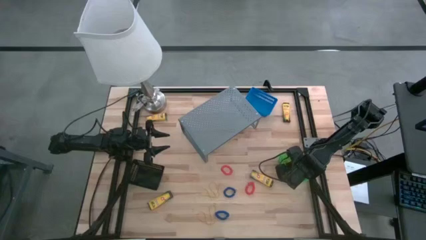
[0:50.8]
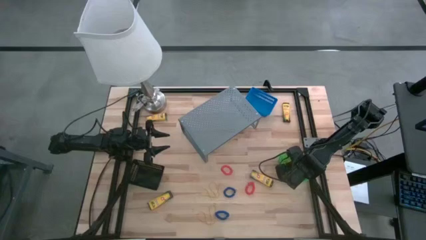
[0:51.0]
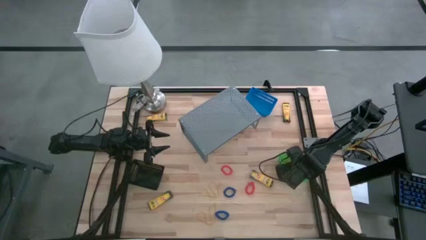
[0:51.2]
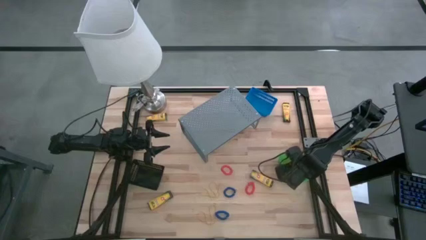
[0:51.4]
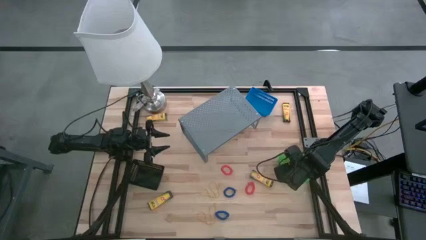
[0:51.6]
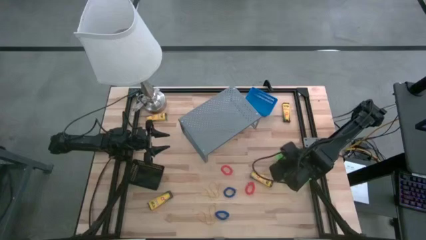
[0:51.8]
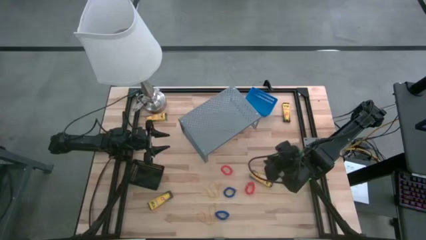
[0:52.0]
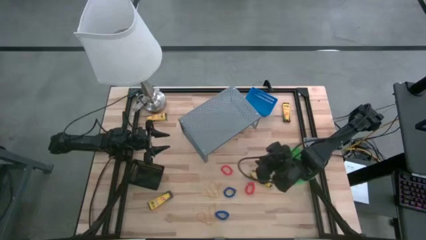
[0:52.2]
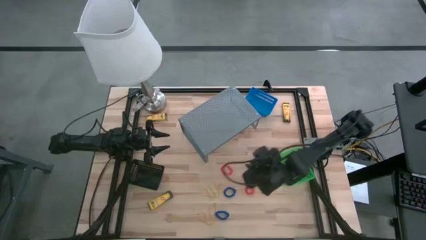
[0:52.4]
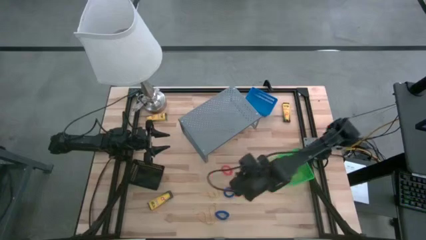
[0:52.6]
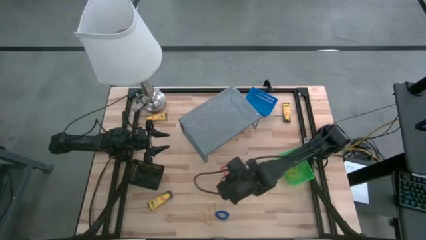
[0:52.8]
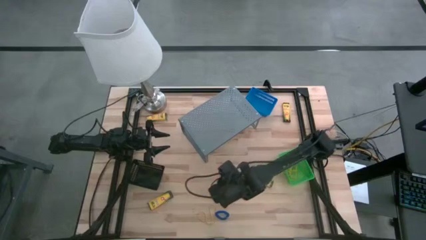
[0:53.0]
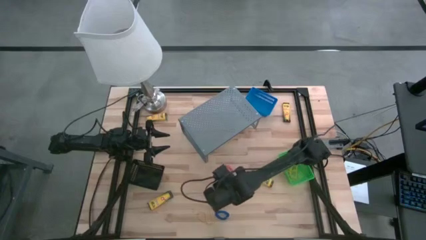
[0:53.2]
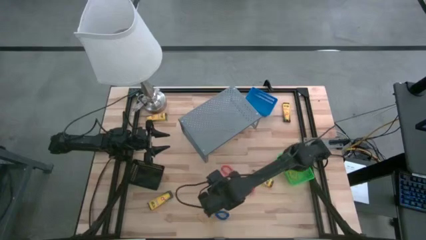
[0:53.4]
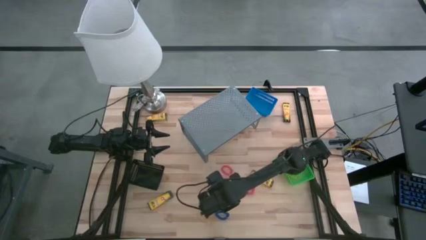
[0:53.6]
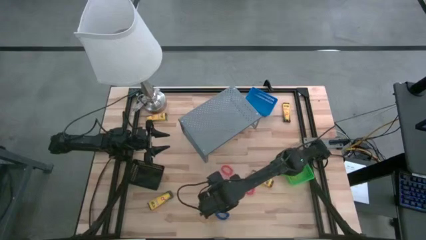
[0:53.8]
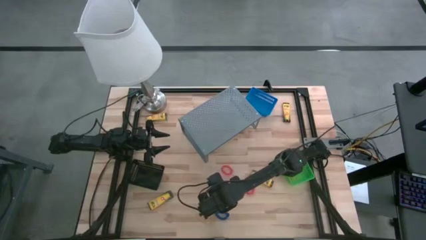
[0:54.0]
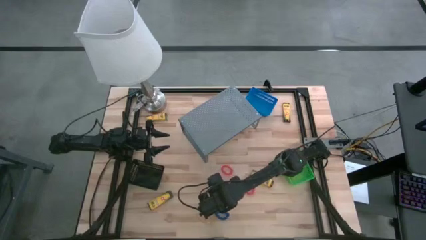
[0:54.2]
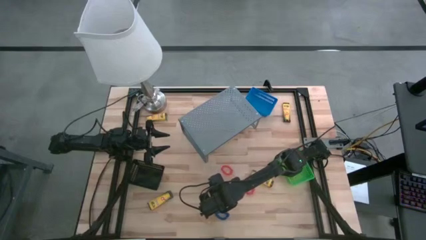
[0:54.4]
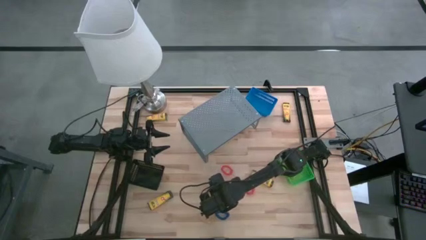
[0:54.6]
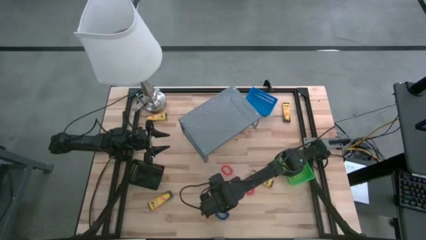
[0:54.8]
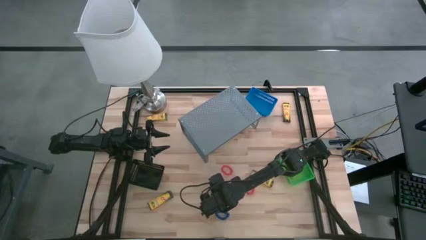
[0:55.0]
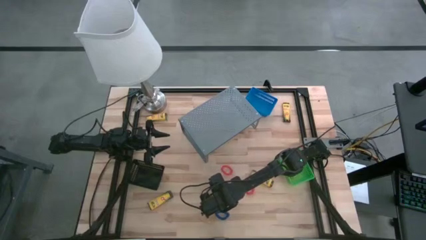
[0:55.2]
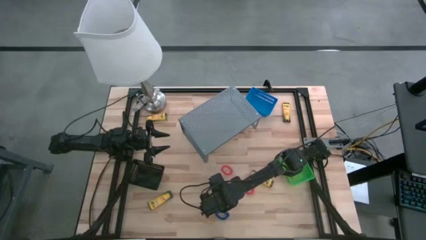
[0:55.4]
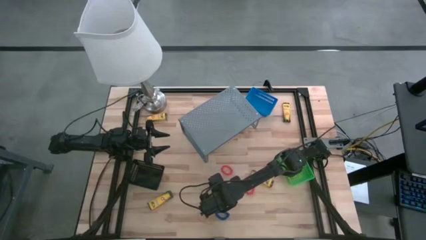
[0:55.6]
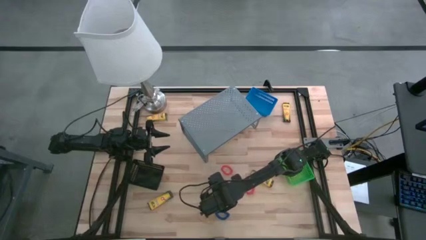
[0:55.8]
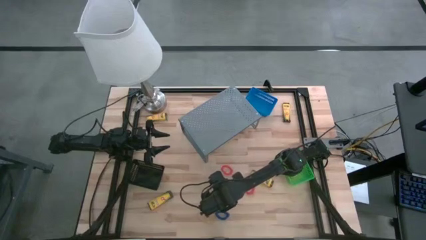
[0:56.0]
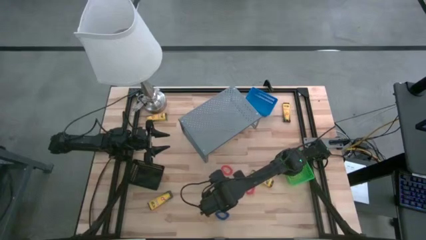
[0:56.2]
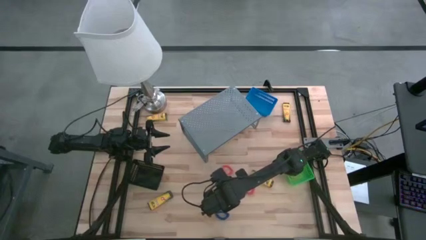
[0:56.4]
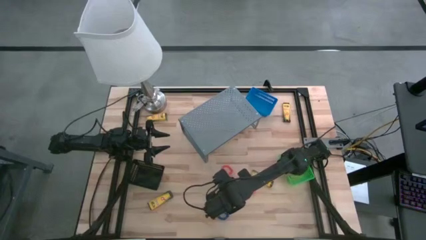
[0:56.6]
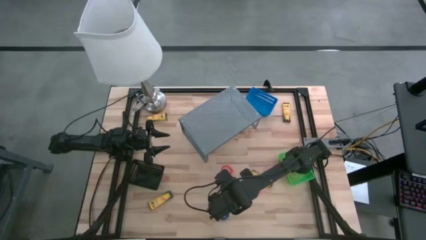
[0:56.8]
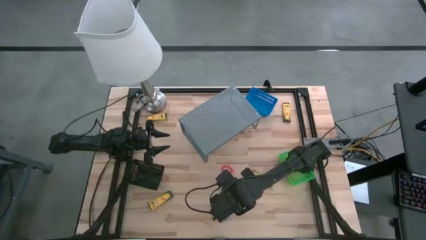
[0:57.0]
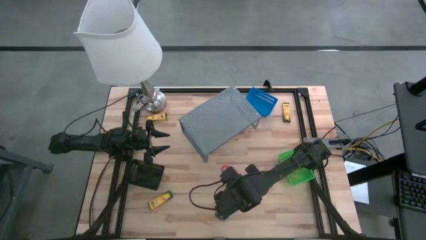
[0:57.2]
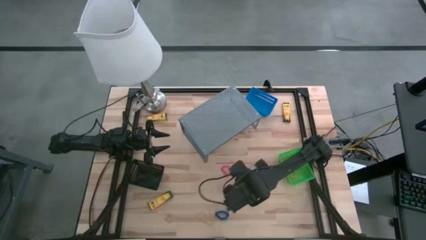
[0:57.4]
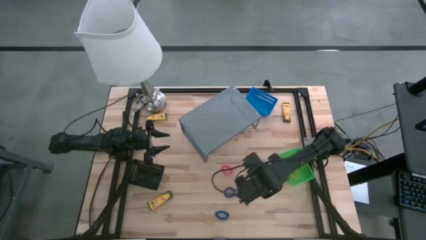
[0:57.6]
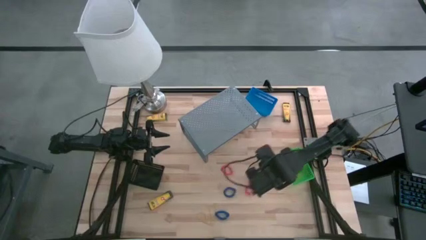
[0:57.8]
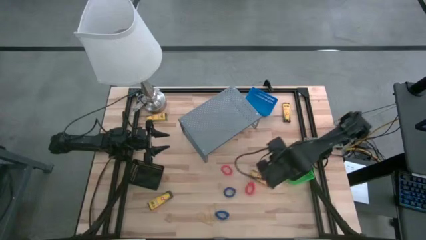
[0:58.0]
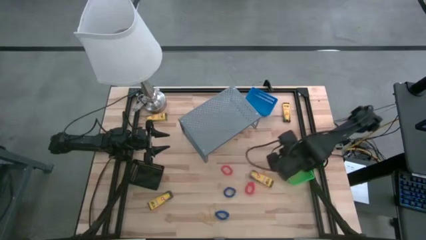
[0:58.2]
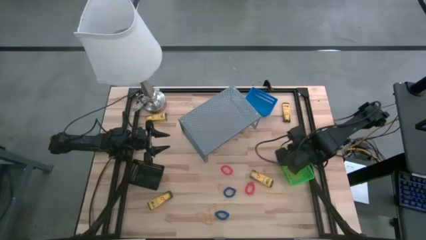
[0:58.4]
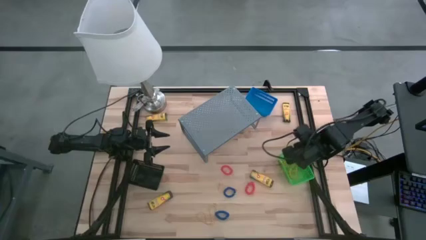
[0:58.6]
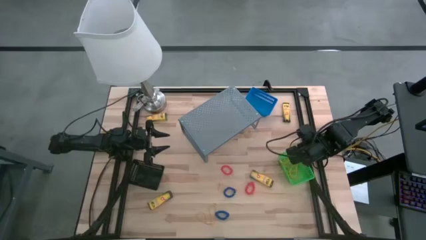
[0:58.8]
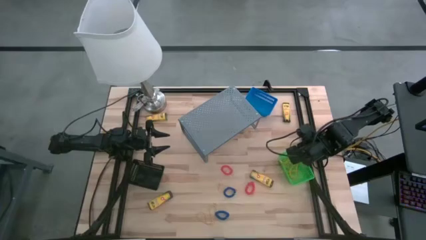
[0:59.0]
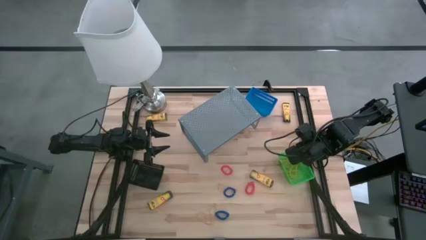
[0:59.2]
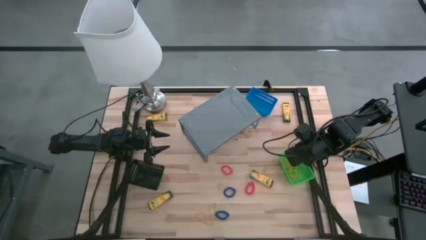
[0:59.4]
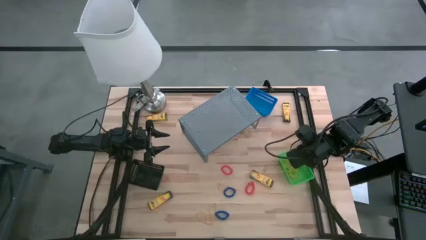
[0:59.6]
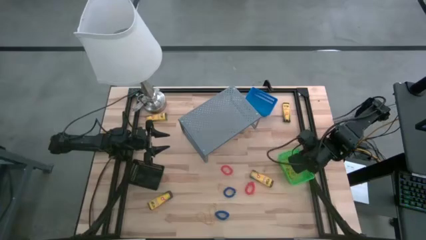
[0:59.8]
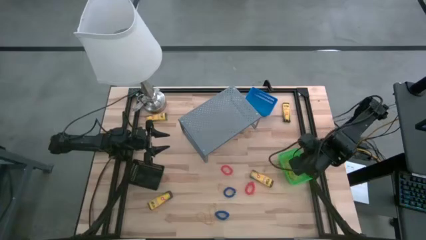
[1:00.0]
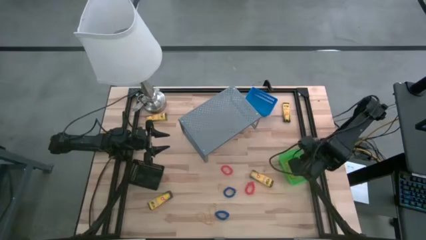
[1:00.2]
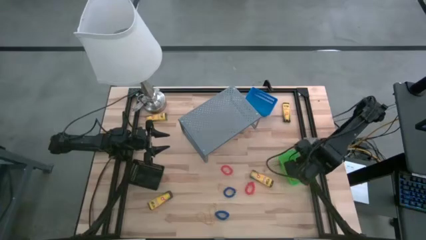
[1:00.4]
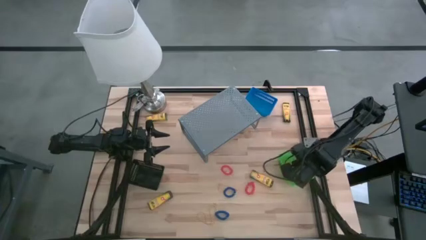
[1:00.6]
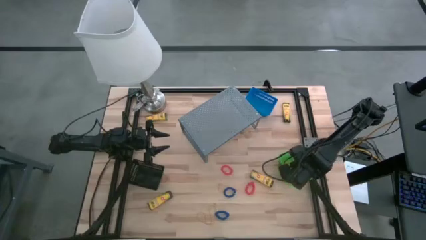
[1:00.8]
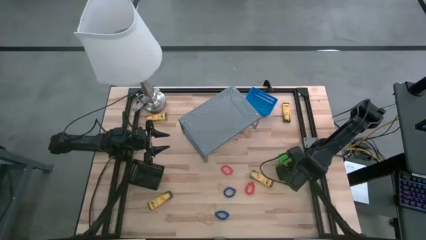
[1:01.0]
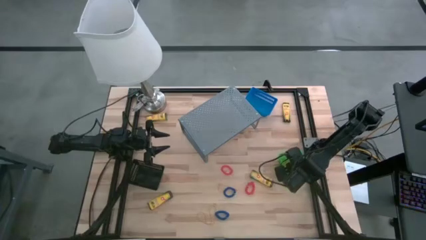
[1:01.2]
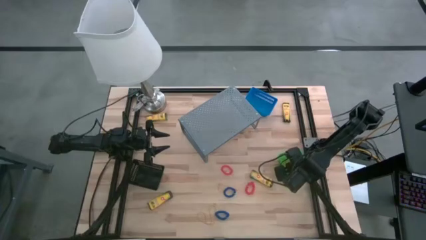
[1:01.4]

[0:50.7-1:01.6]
Task: Pick & Place Office Desk Supplies
Put the yellow rubber band into the green basket
